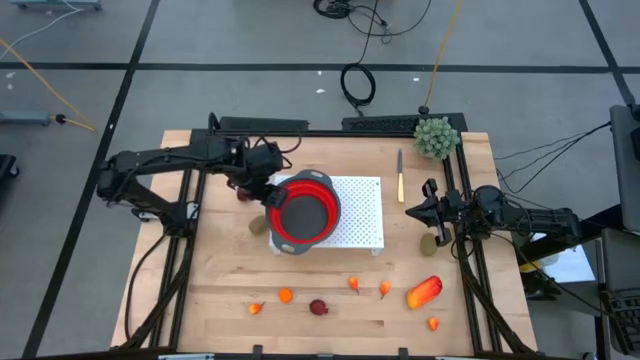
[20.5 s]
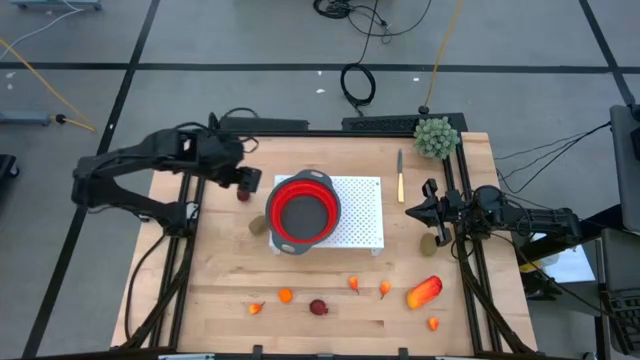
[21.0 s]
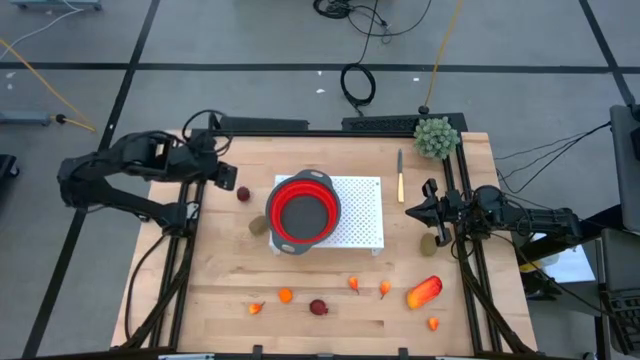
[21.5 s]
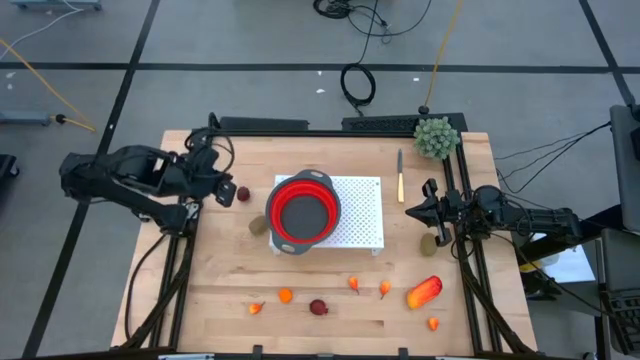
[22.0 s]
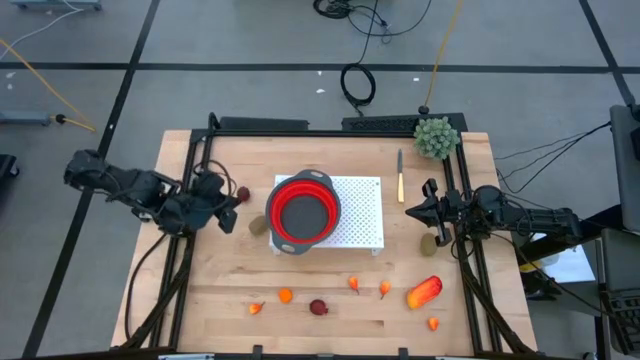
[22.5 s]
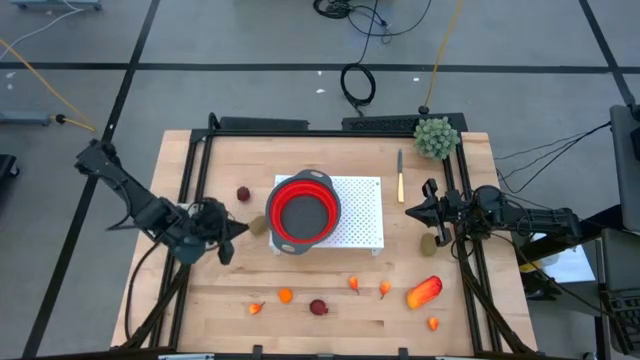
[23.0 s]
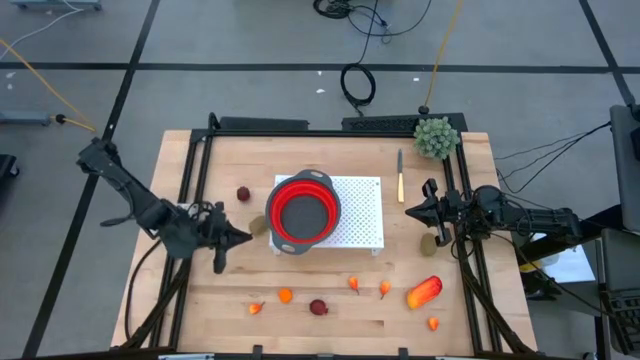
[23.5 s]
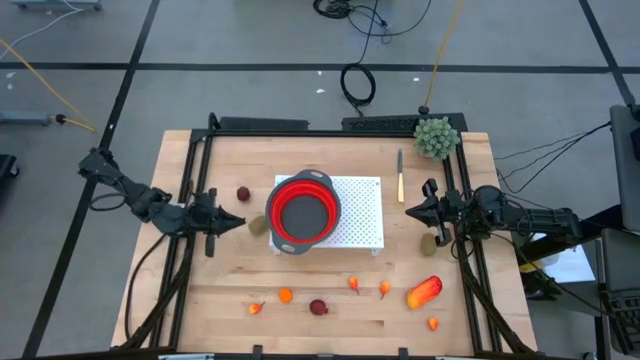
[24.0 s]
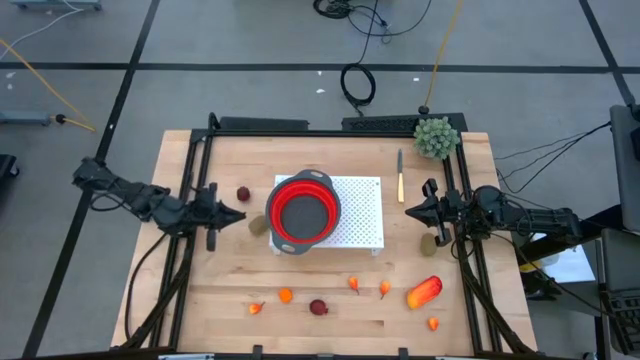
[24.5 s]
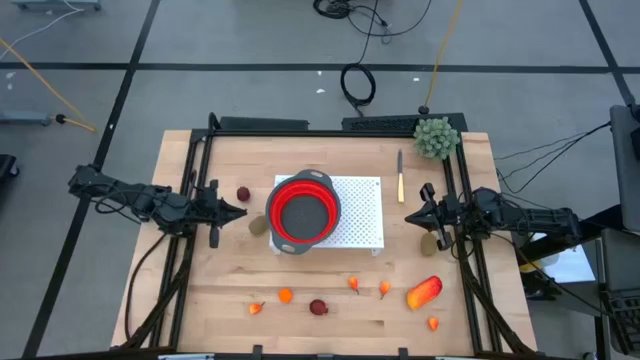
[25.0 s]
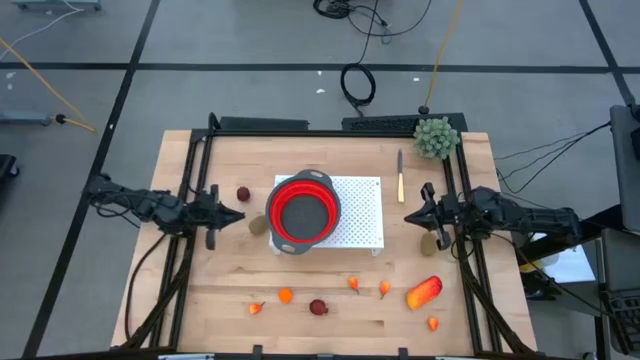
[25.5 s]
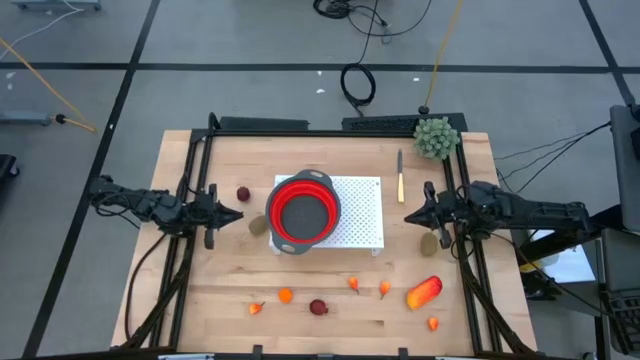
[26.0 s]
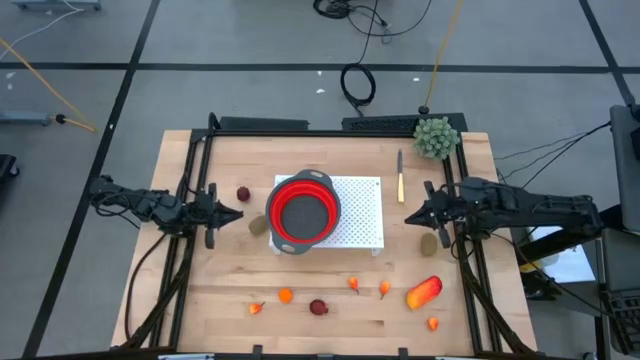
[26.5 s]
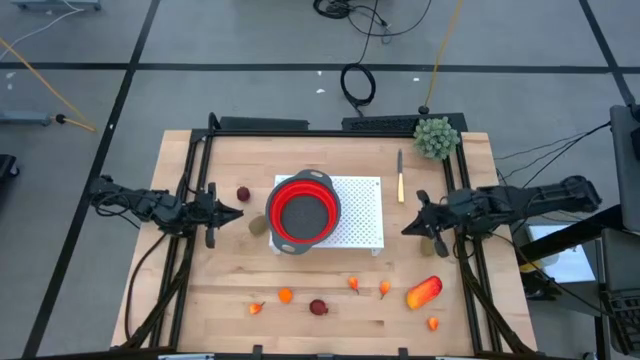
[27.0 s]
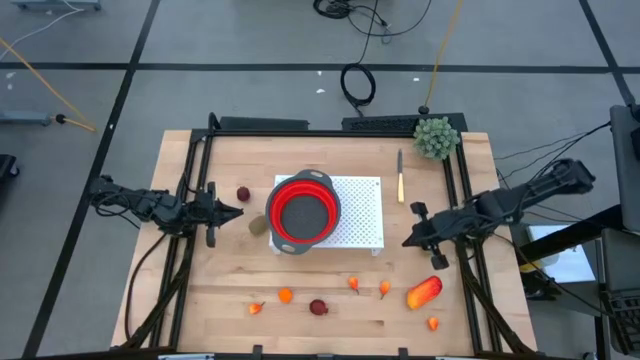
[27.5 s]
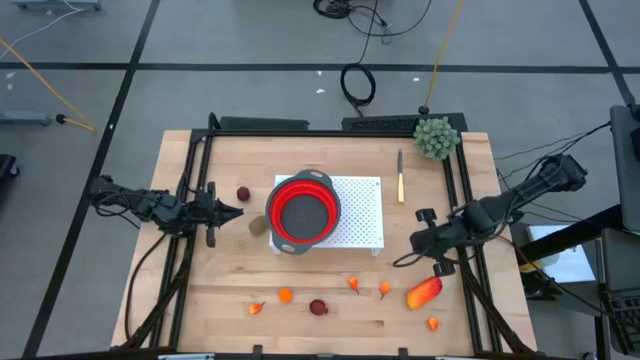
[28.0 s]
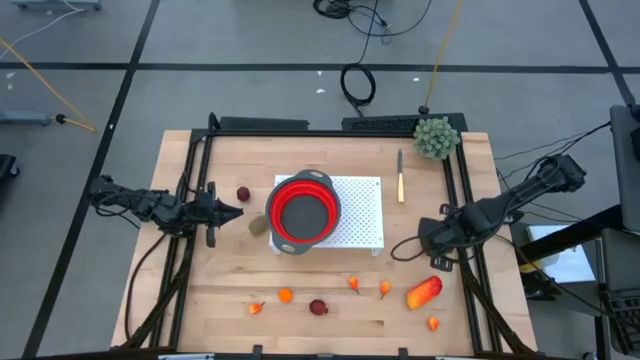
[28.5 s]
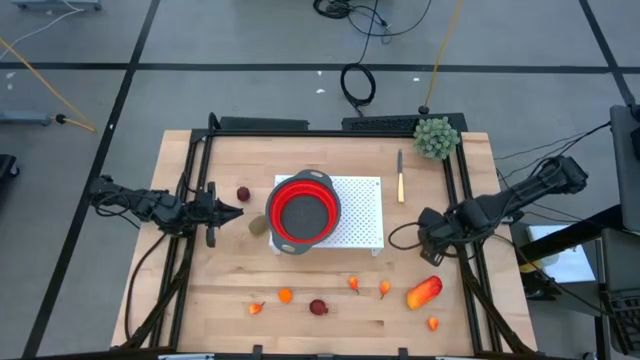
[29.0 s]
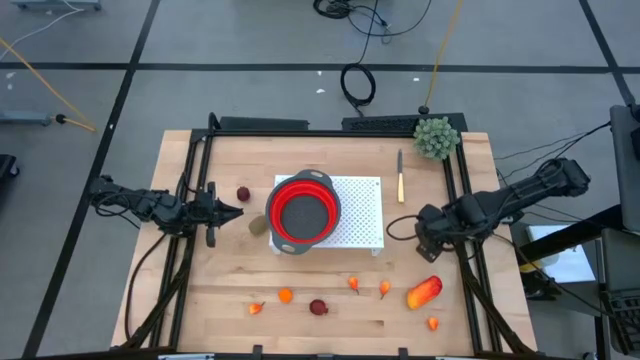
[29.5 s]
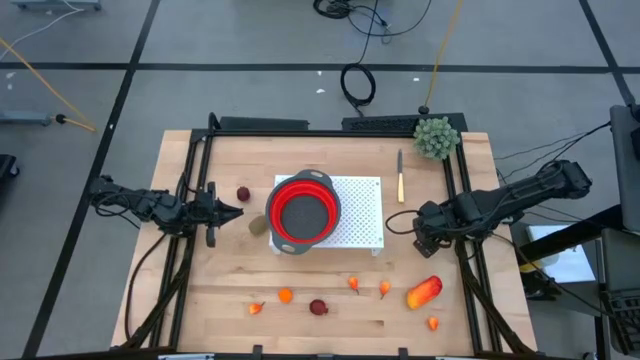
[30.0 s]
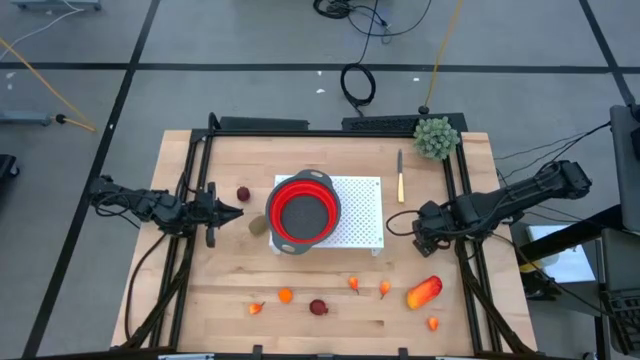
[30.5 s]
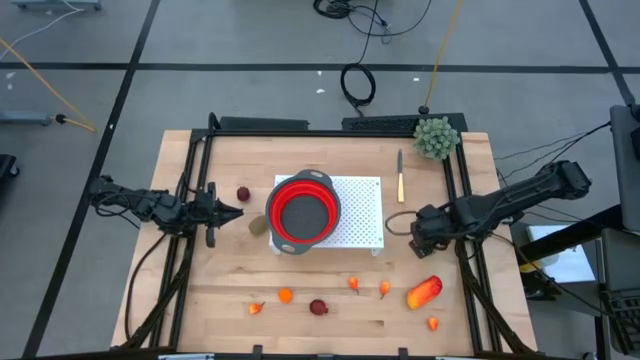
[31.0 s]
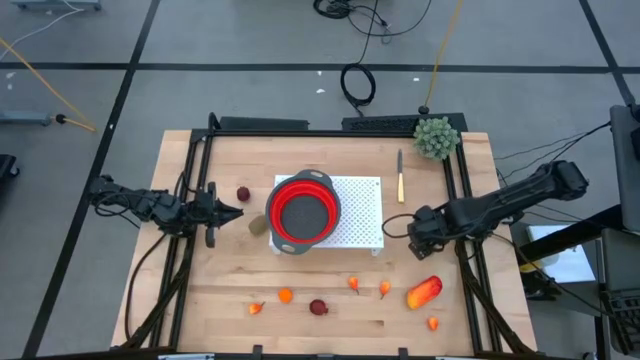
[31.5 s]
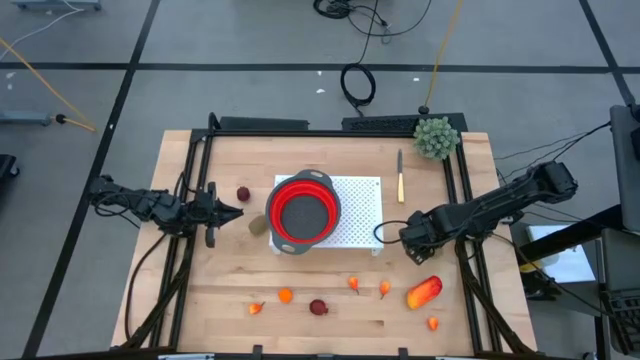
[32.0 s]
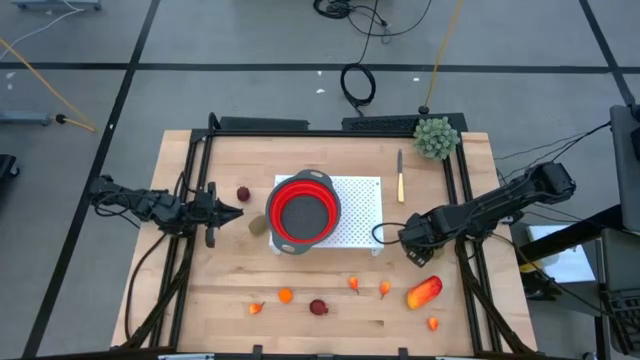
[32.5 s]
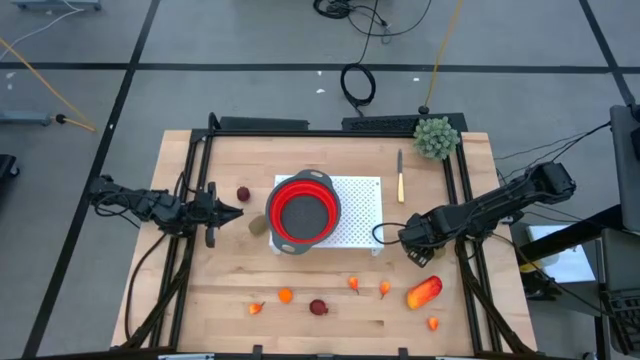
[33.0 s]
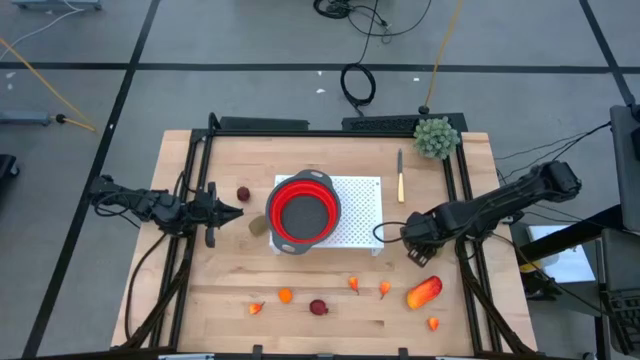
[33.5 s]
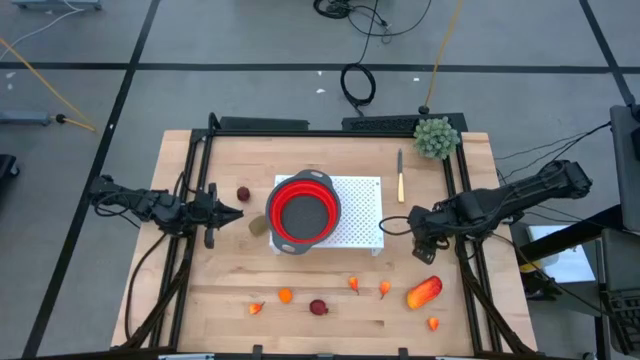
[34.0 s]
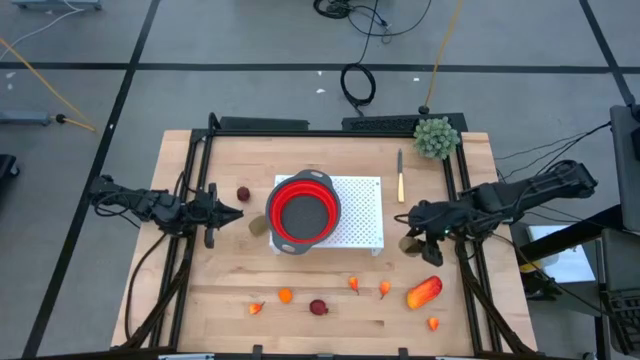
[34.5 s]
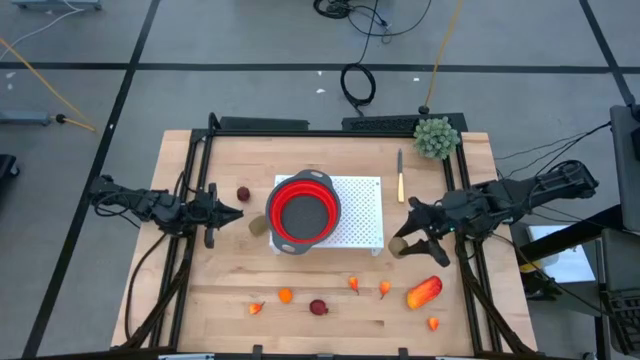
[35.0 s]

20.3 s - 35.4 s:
Task: Pick & Place Fruit
Put the right kiwi into the strainer bowl on the shelf
